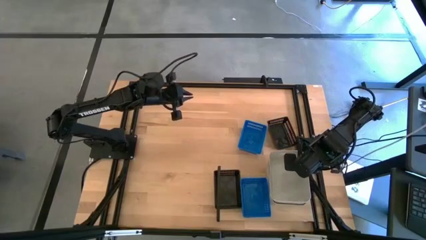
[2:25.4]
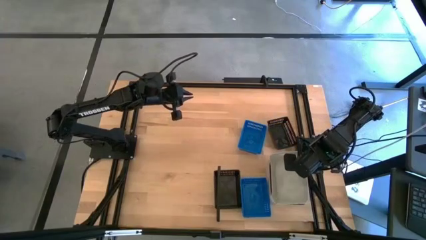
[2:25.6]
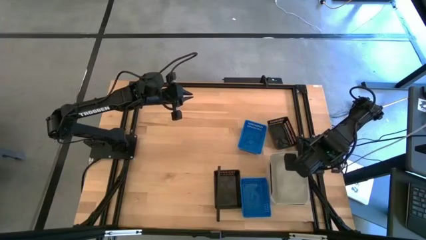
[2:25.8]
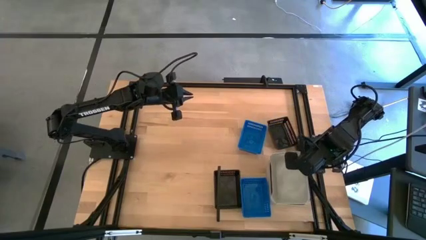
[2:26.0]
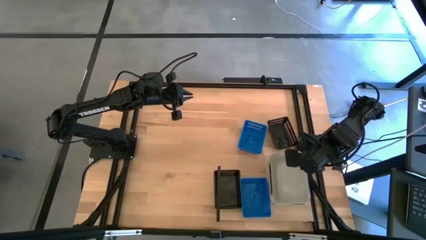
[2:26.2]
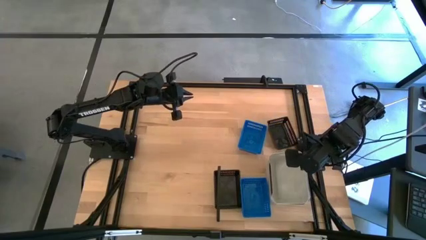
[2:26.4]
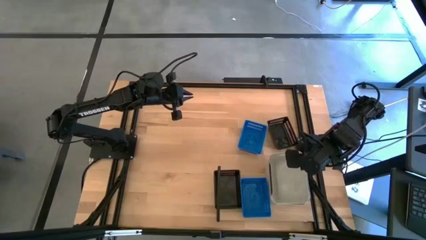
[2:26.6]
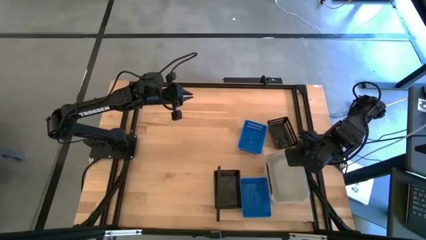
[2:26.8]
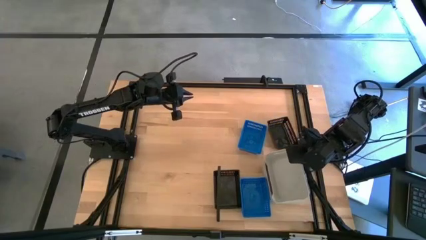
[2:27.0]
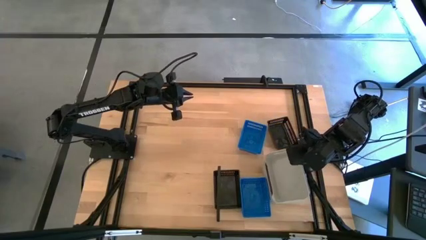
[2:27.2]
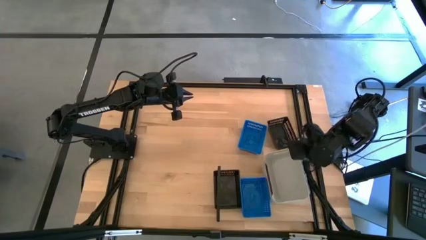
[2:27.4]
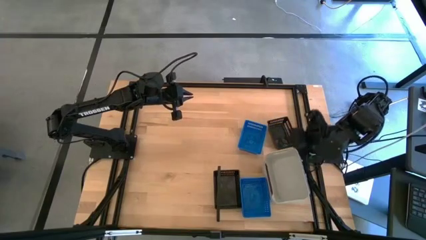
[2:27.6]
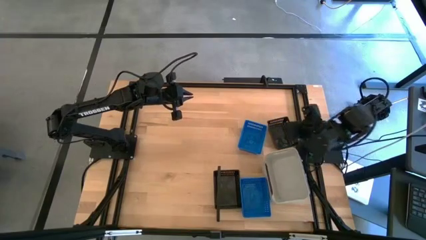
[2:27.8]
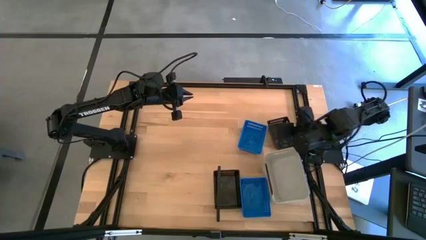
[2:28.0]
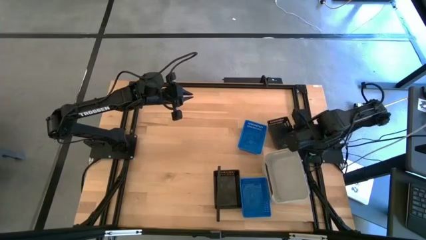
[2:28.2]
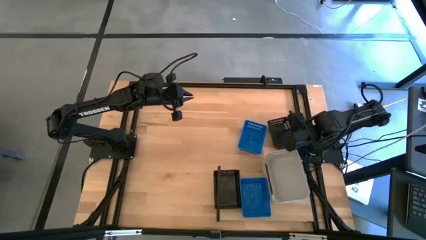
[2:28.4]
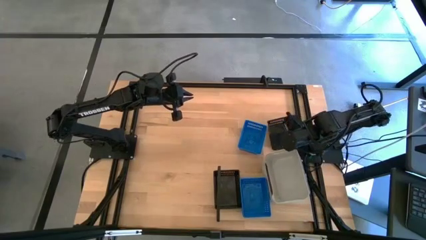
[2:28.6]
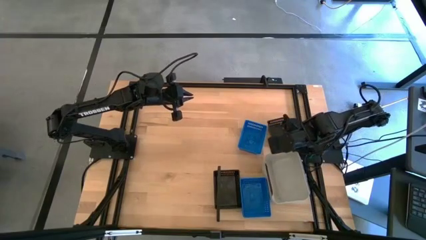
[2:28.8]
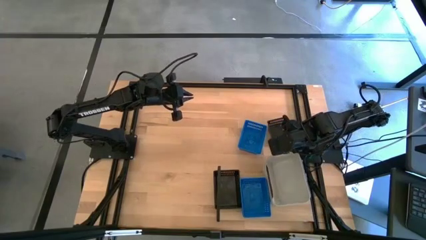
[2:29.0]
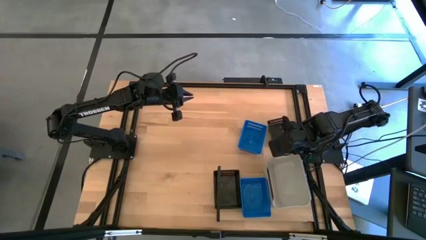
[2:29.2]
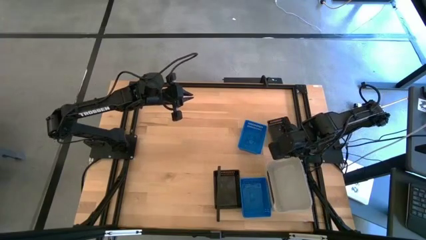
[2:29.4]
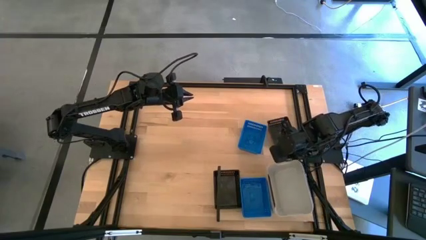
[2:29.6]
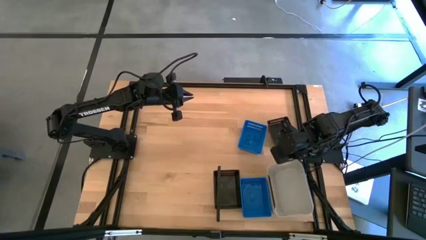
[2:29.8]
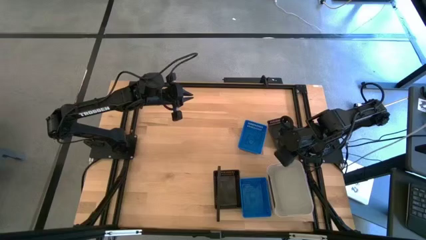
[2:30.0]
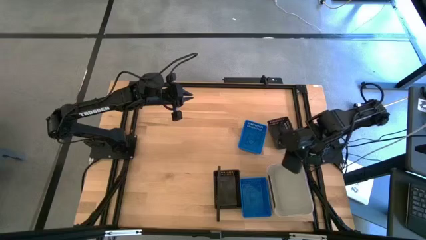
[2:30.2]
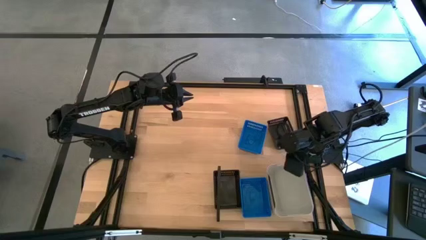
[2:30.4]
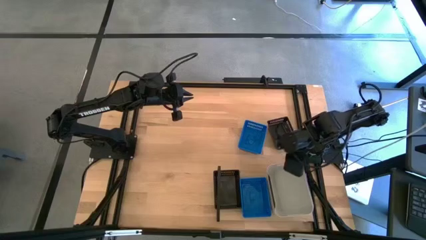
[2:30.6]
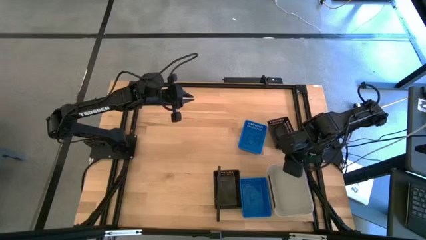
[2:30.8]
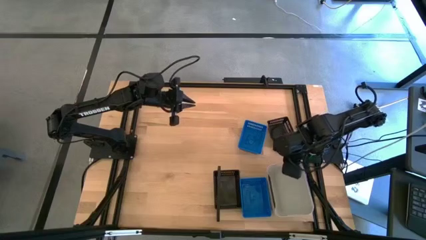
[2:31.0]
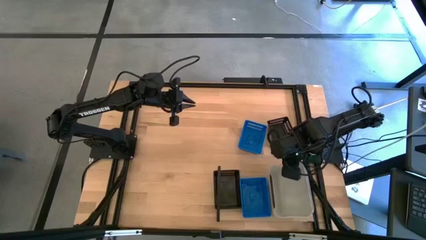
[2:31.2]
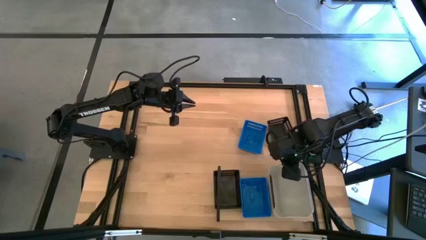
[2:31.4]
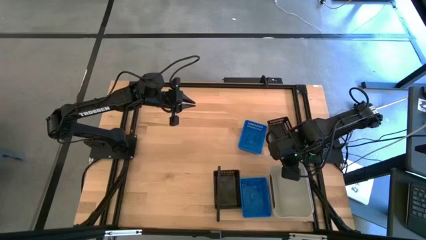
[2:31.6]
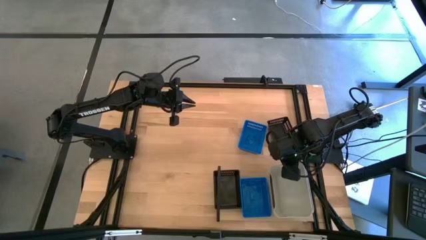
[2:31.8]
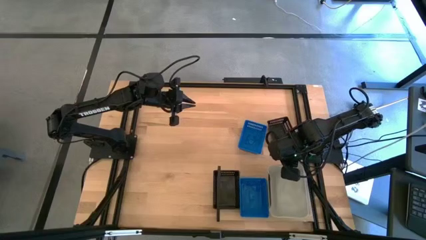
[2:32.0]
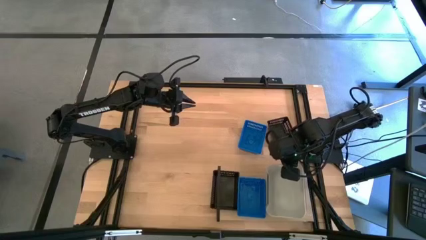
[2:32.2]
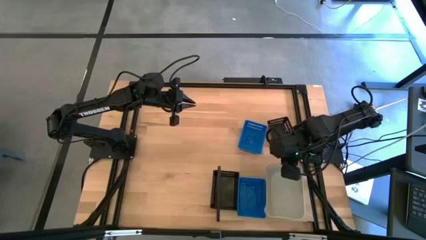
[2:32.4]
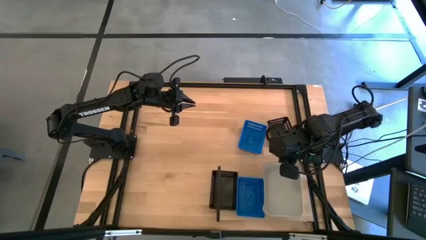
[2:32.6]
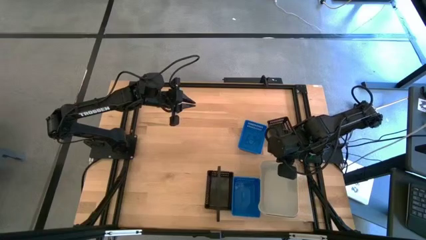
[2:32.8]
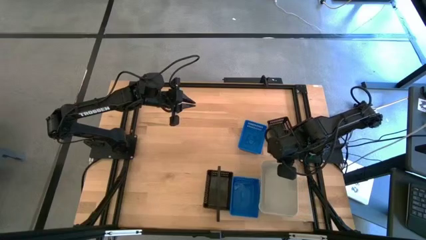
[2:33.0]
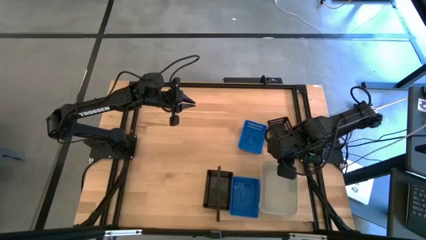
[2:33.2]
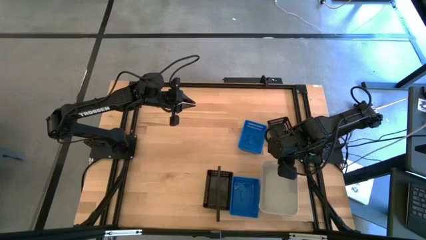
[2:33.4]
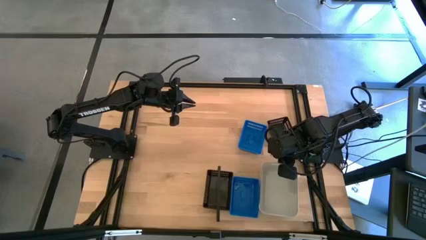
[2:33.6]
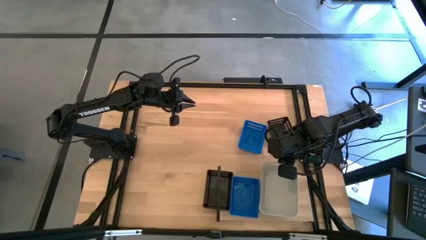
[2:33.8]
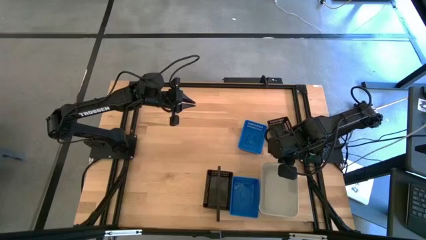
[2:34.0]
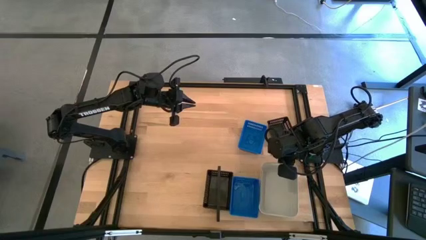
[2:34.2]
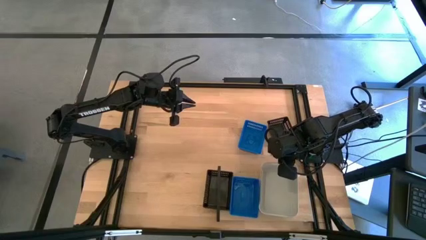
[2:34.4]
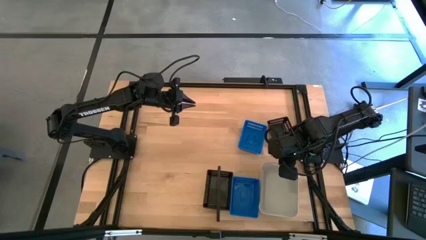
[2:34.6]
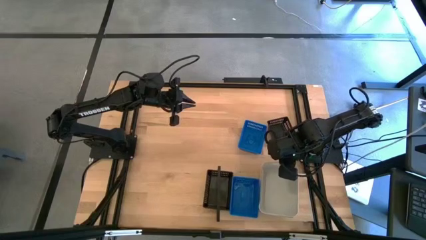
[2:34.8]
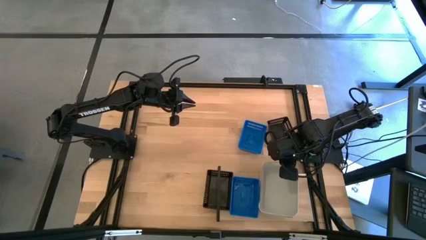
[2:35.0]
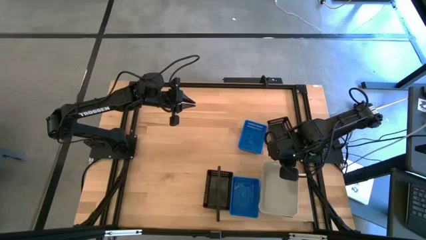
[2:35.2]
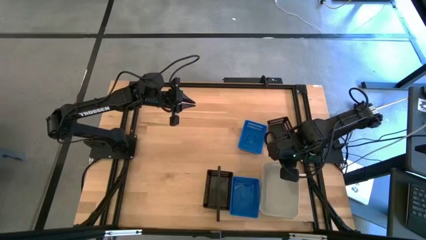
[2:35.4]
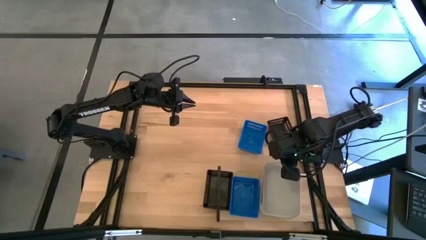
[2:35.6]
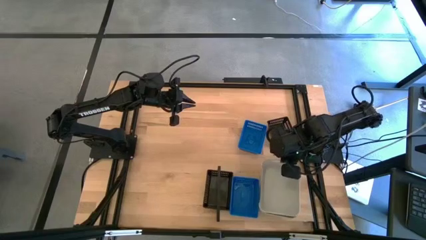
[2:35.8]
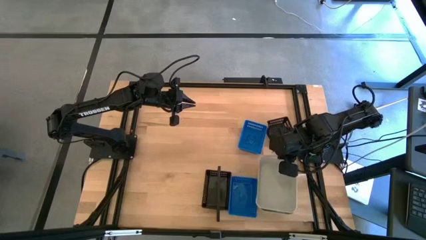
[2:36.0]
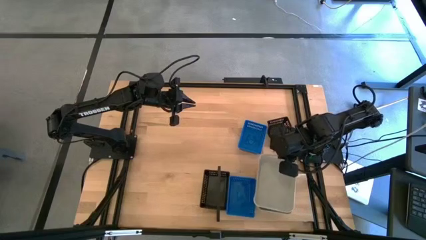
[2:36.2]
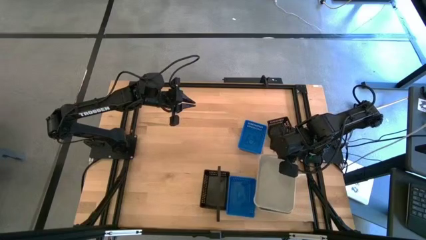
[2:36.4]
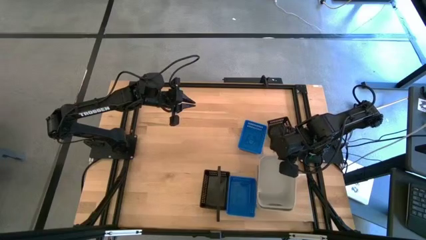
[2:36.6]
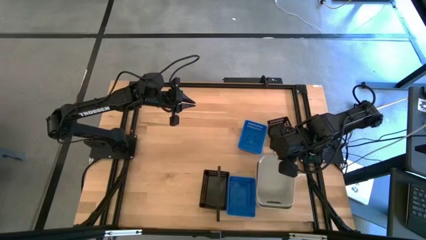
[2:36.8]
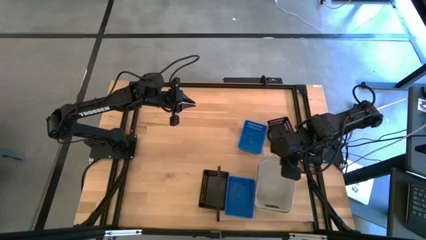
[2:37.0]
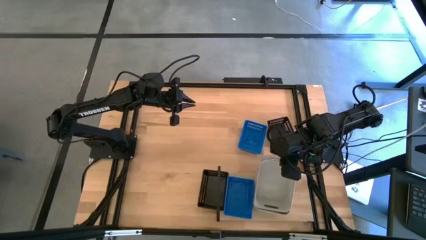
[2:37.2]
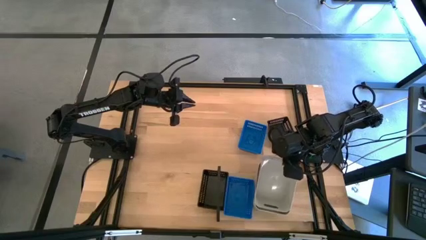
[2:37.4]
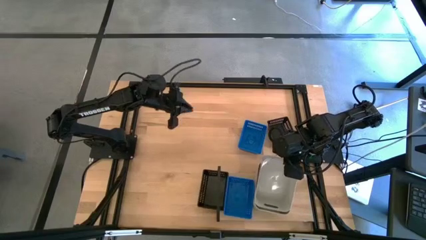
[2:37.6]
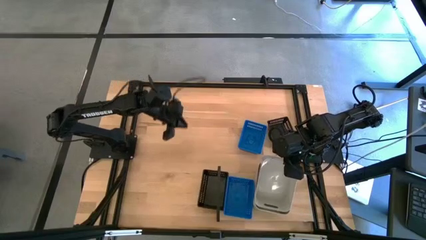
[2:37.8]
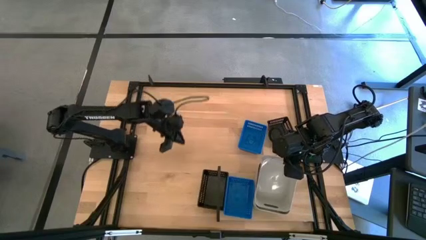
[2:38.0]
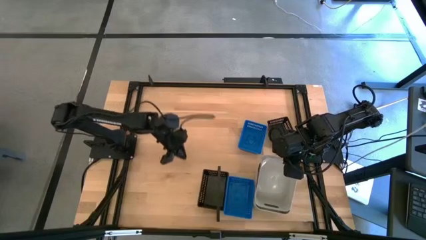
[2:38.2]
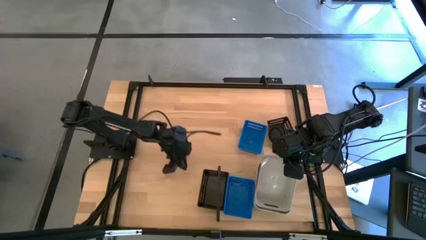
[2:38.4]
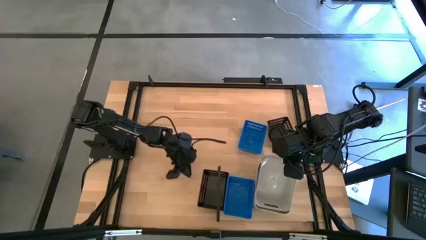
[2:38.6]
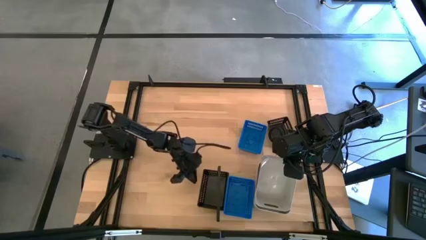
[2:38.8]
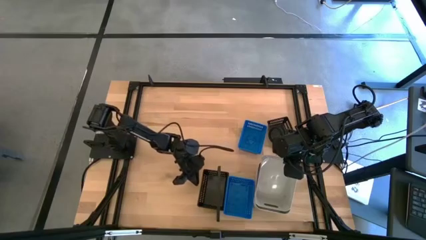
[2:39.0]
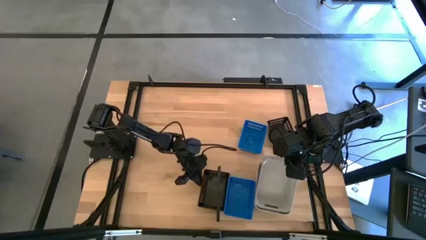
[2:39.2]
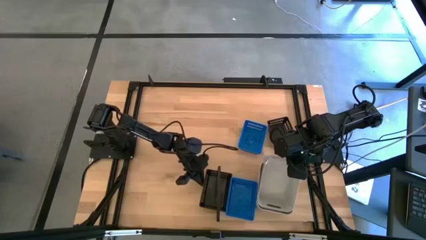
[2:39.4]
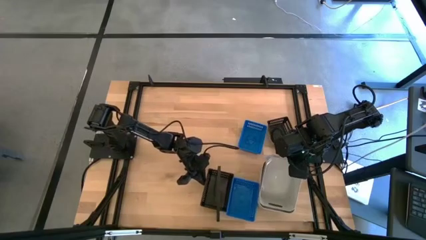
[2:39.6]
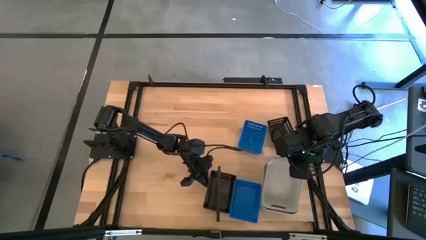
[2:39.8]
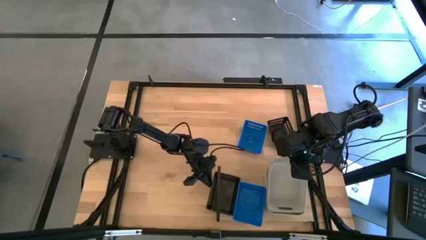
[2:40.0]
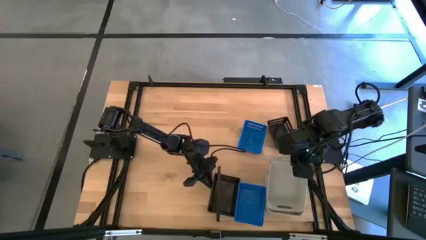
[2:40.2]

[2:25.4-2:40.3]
Task: Stack baskets on shelf by color
Stack the gray bin on top of the gray bins on the shelf
